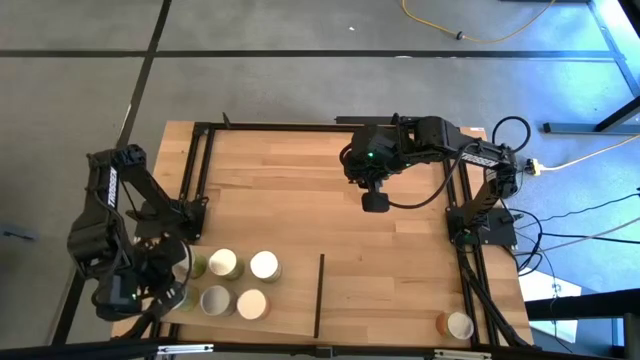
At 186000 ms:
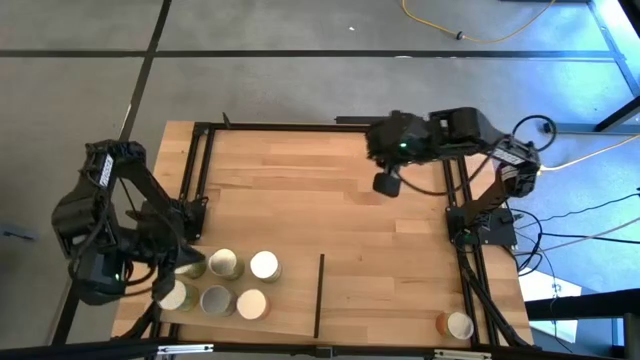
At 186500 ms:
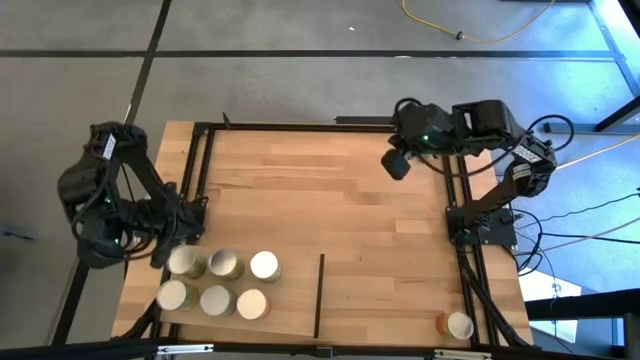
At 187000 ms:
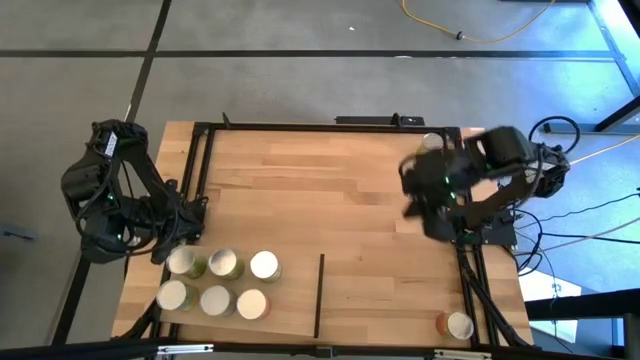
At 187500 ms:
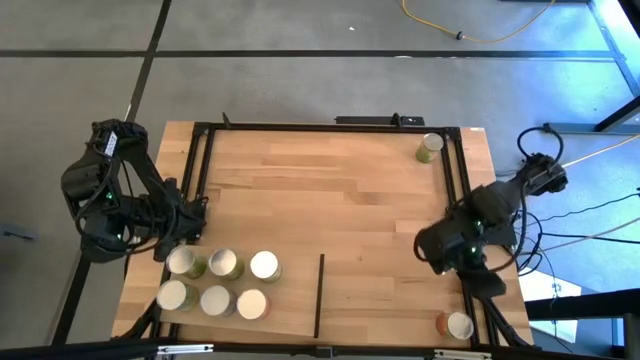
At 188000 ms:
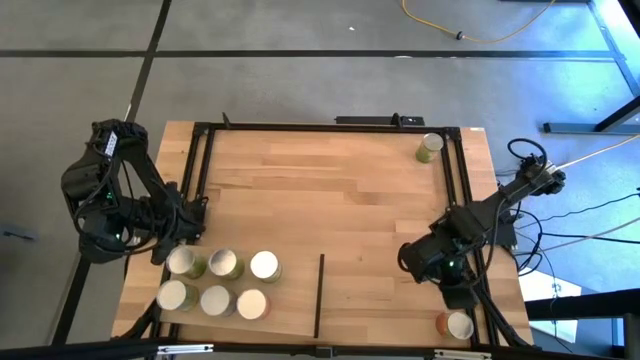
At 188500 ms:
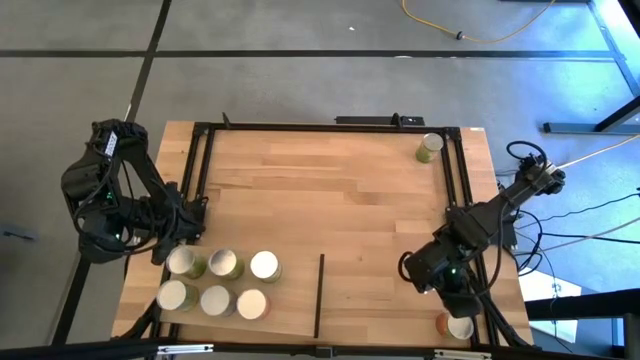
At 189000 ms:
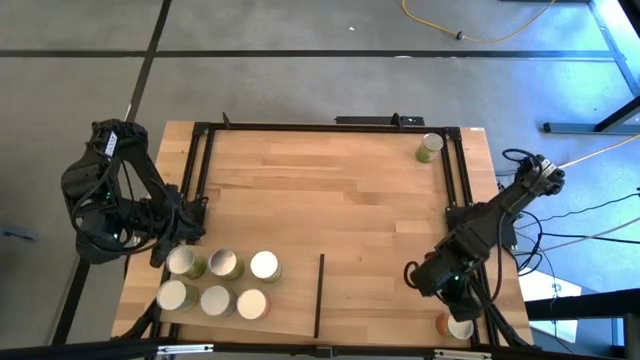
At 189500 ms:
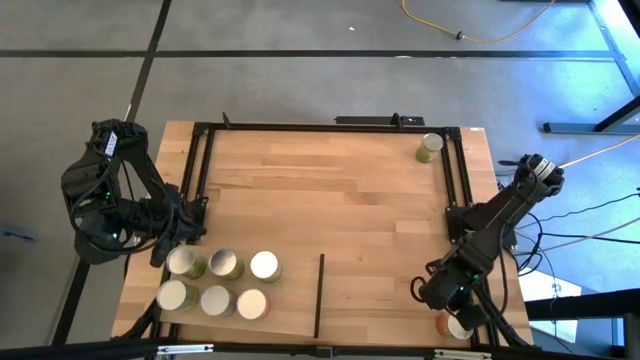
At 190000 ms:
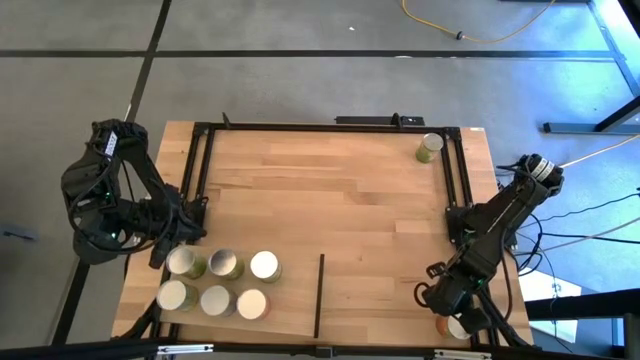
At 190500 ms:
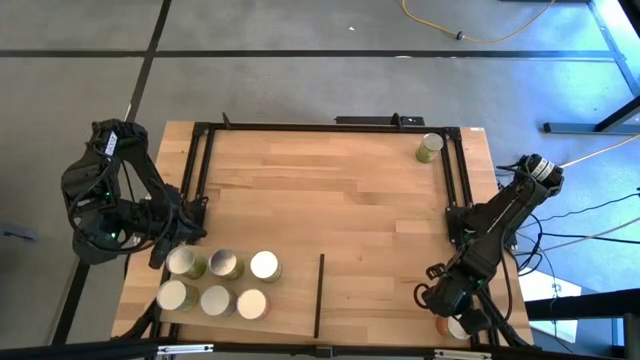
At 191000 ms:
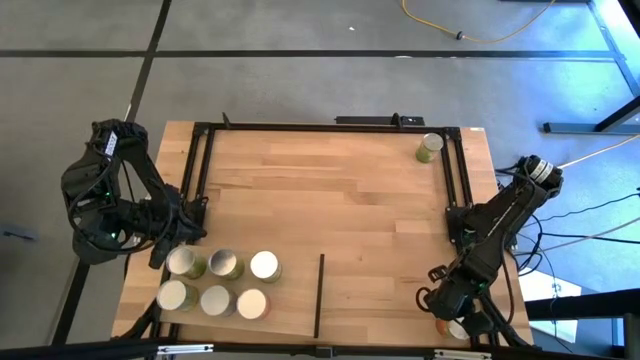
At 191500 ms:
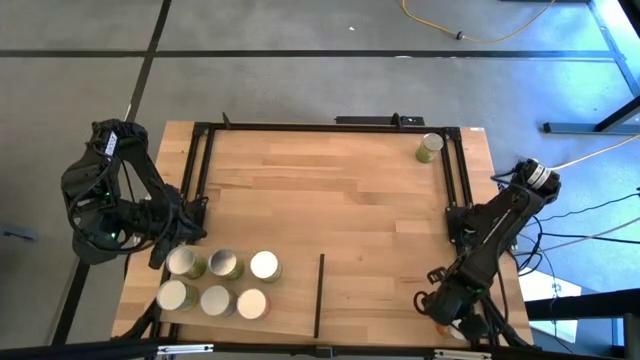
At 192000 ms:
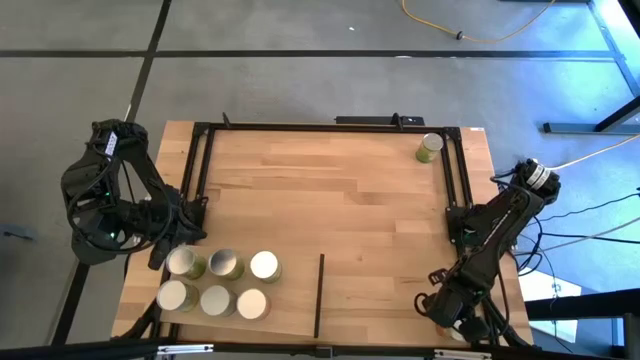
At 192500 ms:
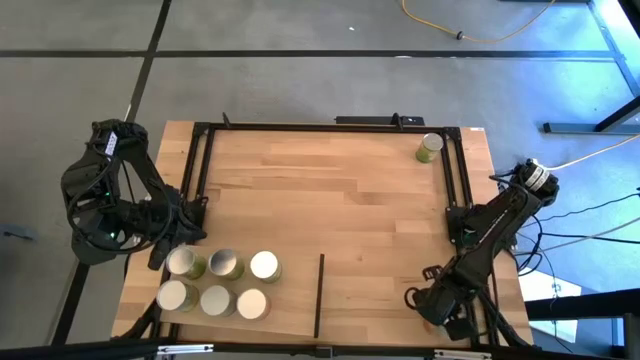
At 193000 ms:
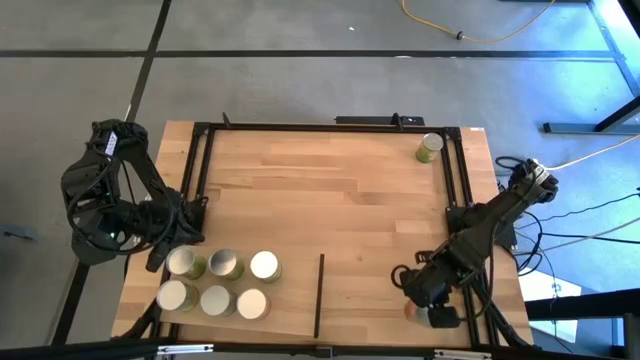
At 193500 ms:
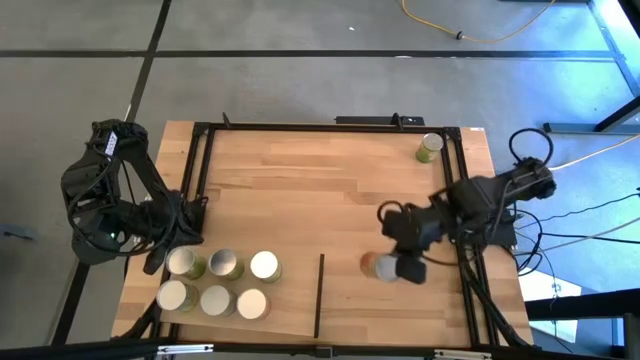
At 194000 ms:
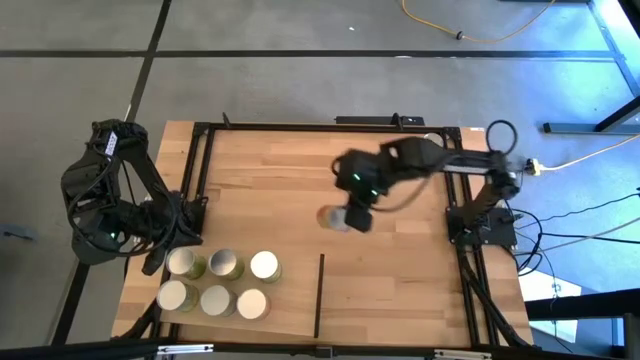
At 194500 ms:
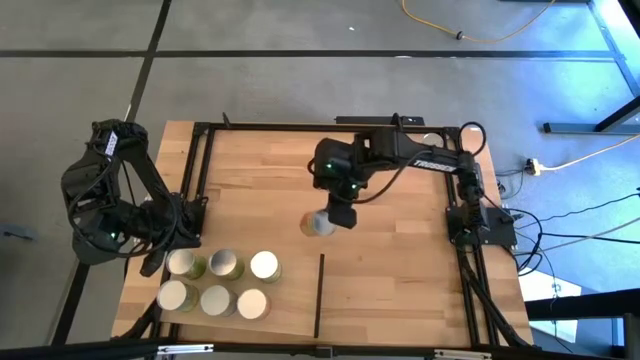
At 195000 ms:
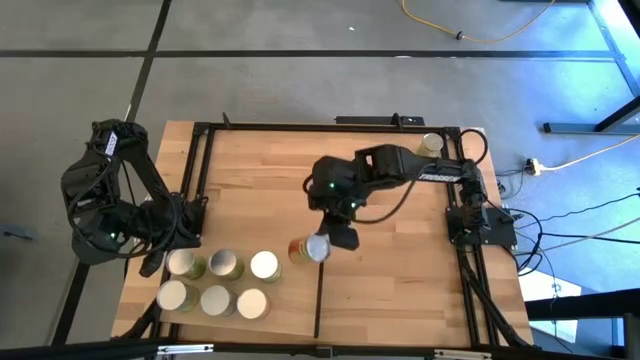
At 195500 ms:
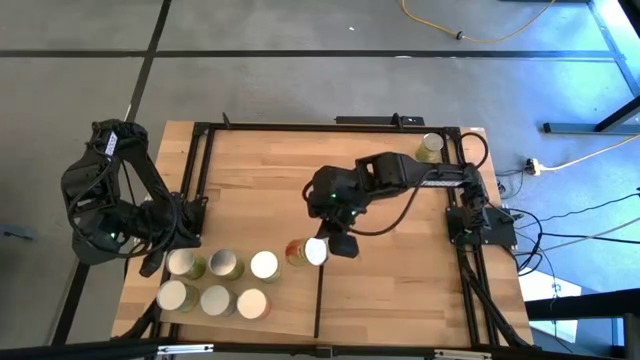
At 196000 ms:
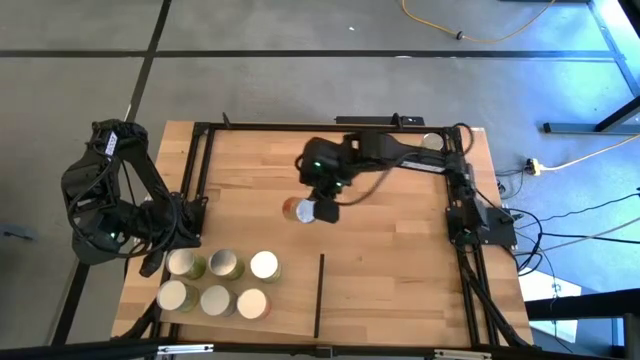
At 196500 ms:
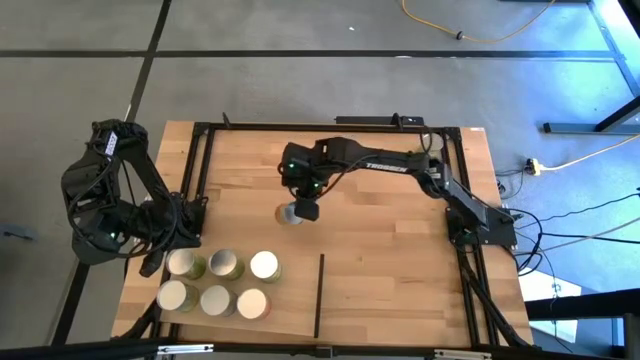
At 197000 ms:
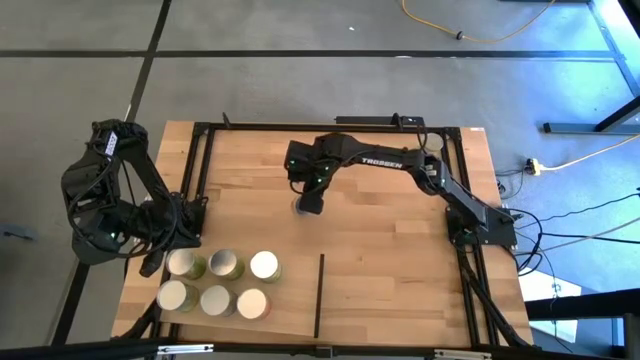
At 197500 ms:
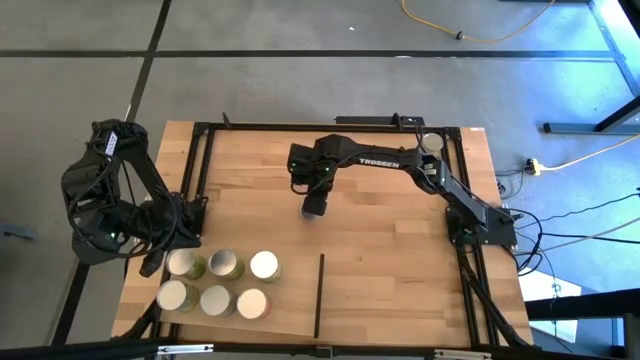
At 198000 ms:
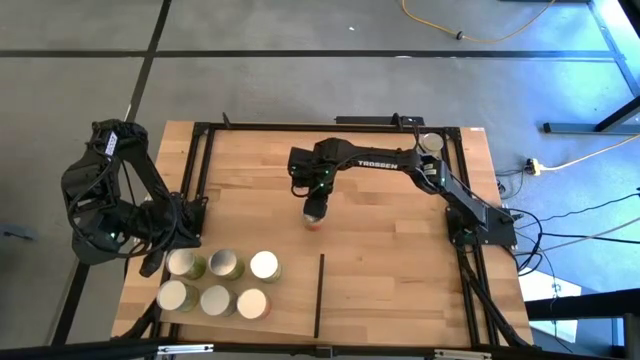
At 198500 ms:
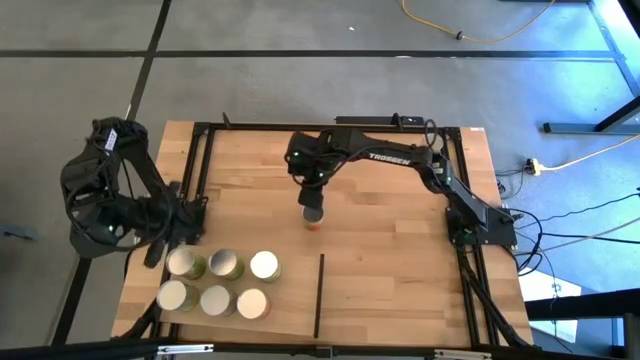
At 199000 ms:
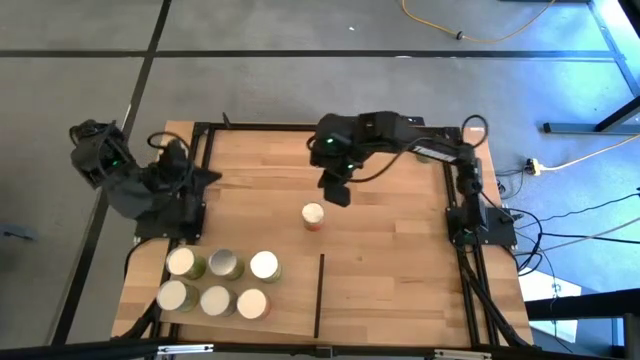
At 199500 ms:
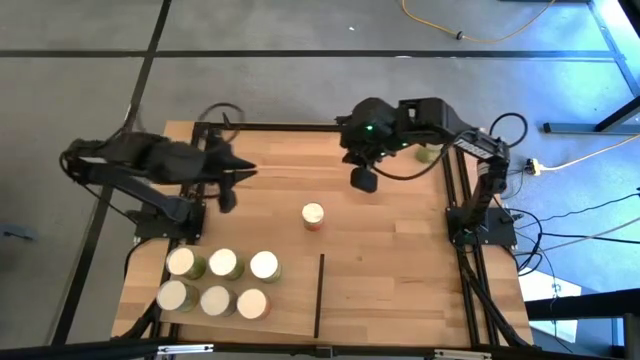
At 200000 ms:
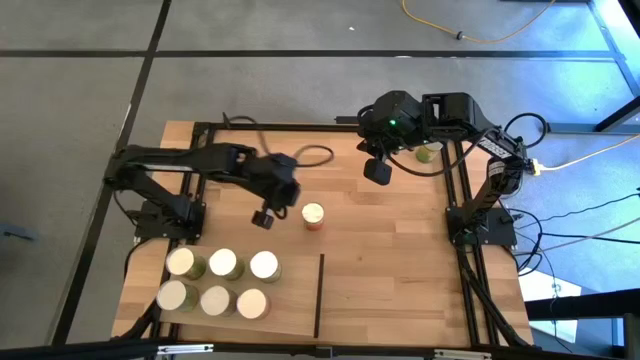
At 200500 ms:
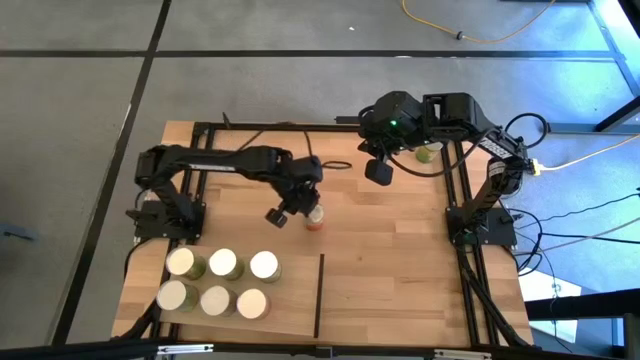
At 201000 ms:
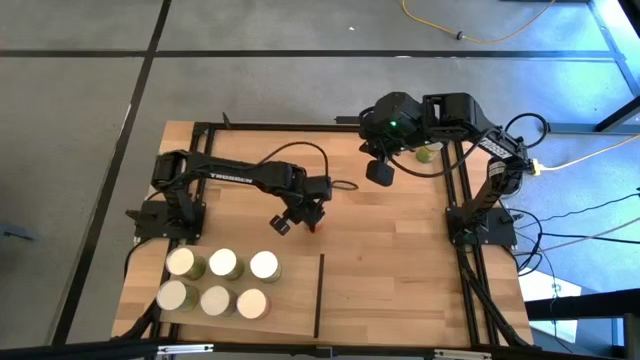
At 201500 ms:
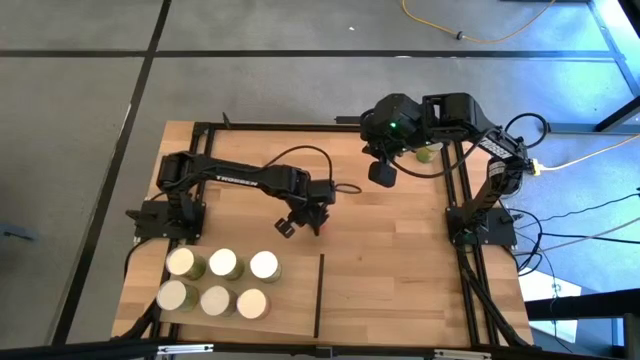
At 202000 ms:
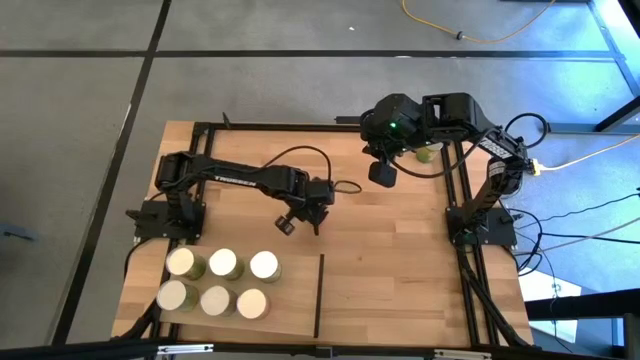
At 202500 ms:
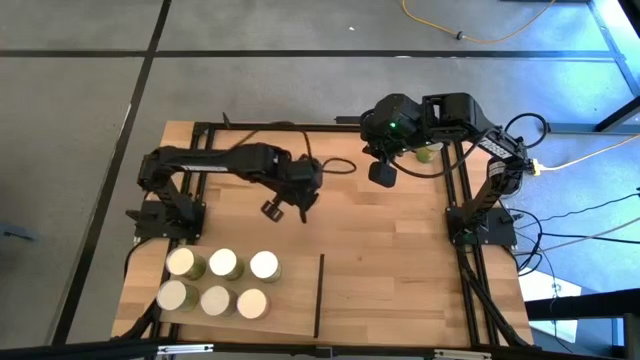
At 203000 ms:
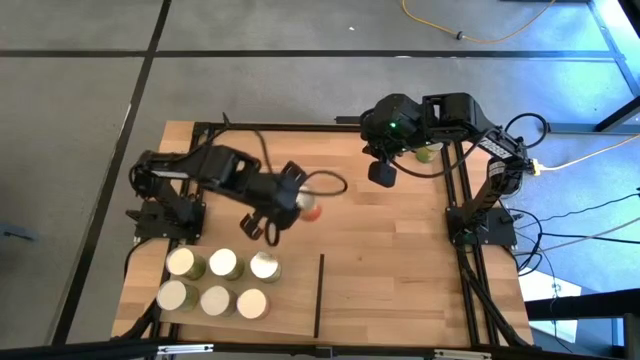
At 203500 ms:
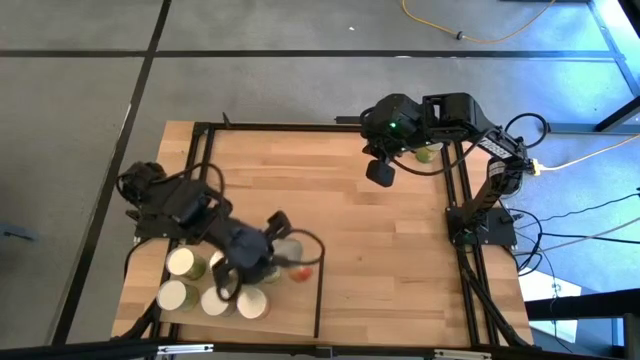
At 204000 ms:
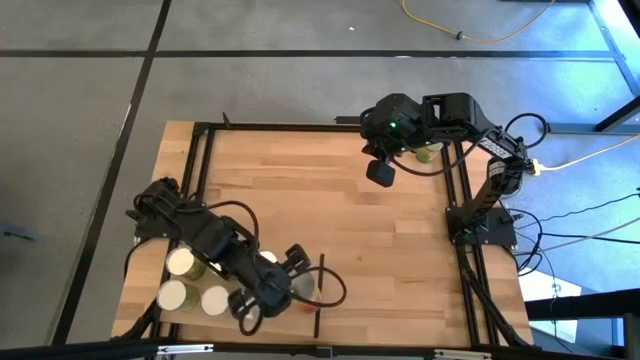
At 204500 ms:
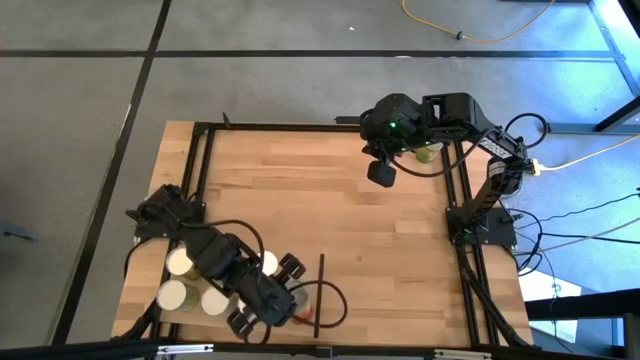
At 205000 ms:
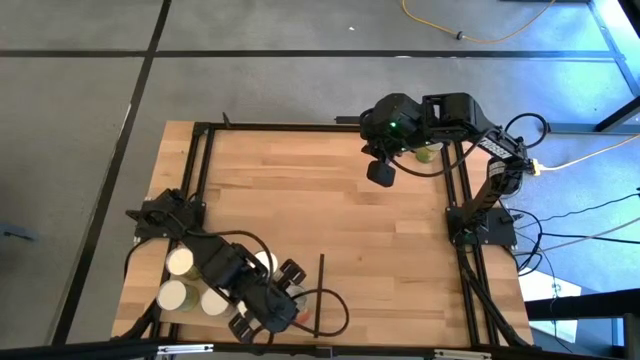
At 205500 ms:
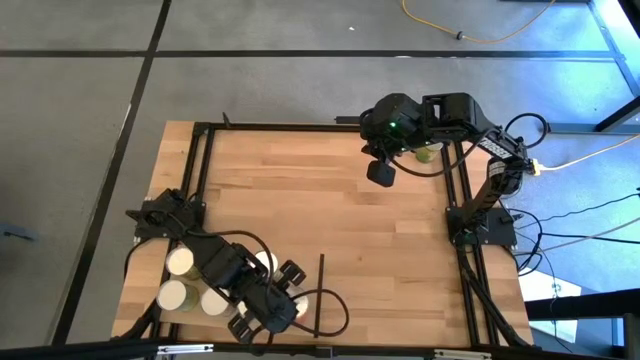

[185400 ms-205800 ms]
Task: Pick and place cans onto a shelf
Put the canned pineapple on the shelf

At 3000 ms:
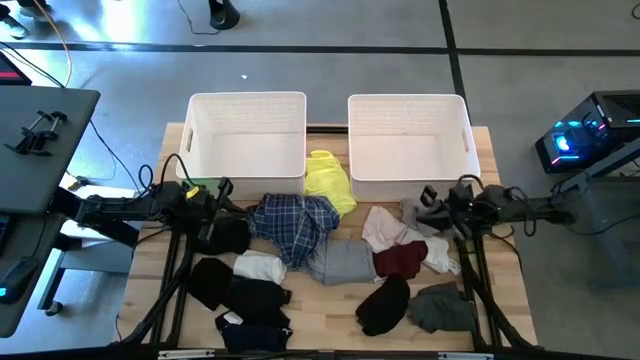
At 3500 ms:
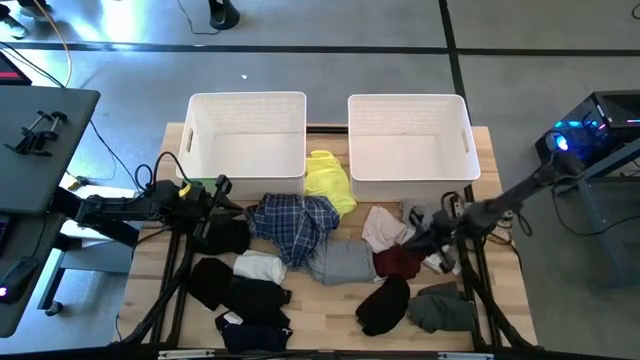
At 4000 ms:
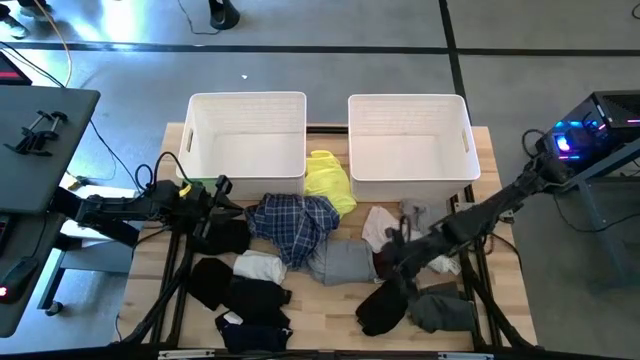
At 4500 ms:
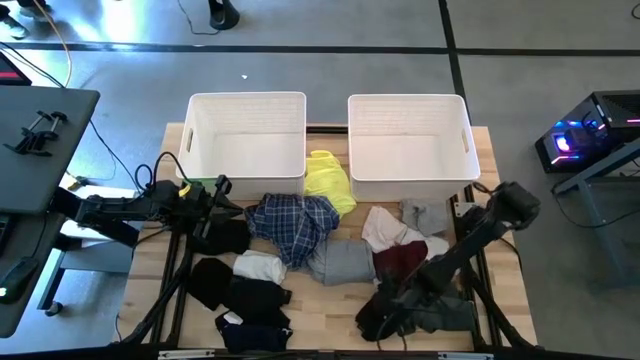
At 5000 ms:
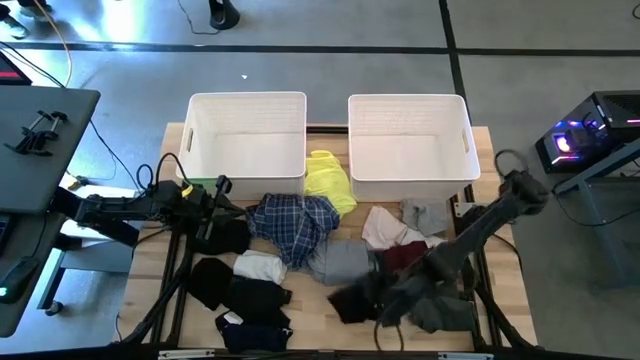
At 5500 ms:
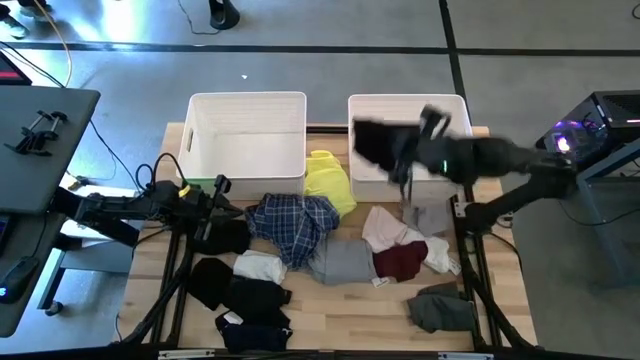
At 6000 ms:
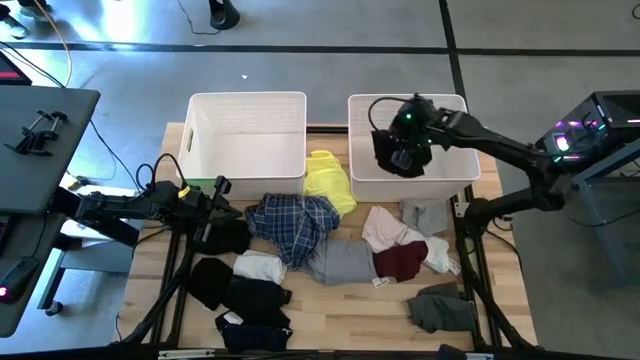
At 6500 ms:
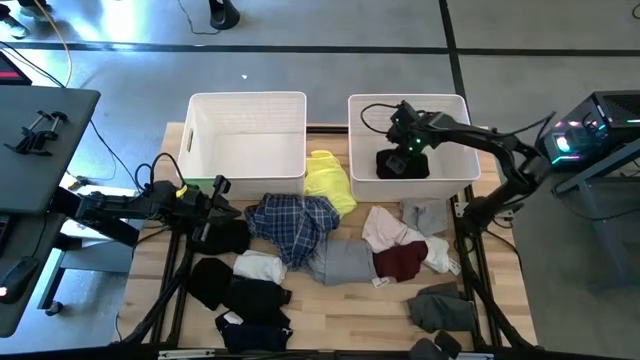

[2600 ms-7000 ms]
Task: Sort clothes
Put the black shorts into the right white laundry bin
